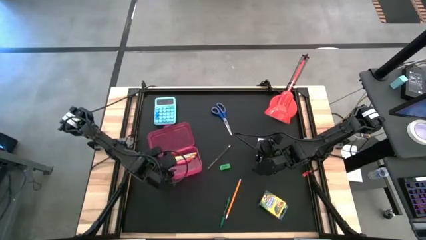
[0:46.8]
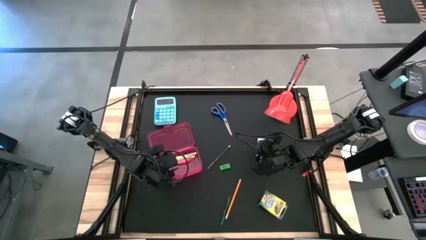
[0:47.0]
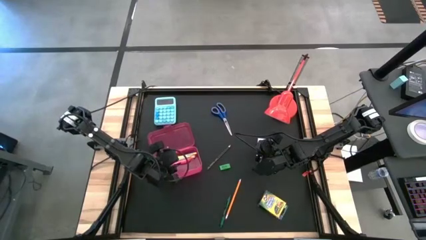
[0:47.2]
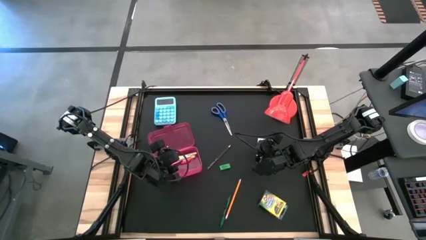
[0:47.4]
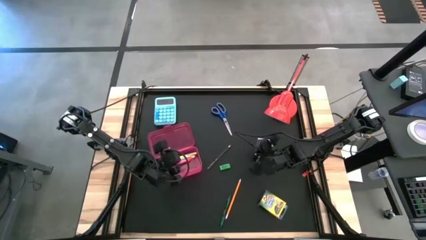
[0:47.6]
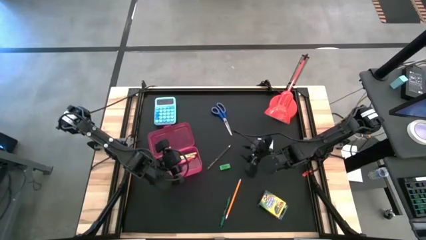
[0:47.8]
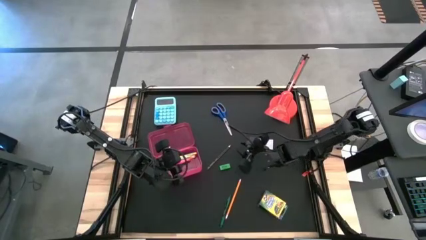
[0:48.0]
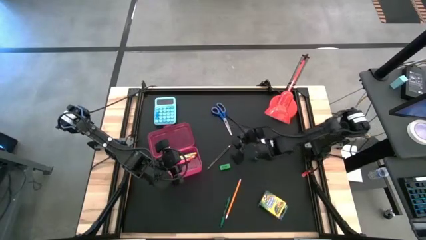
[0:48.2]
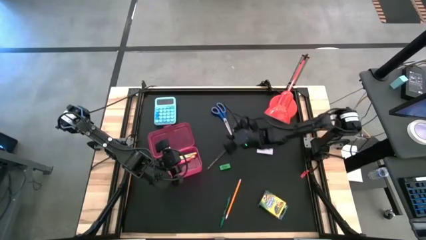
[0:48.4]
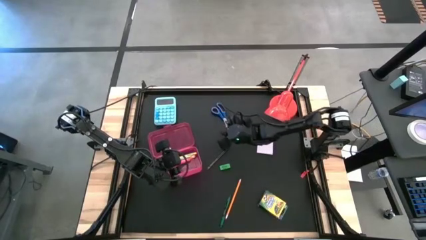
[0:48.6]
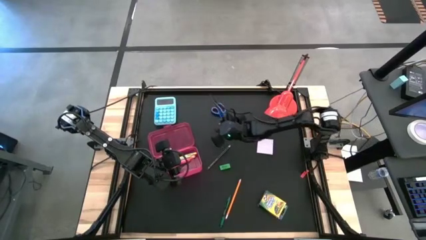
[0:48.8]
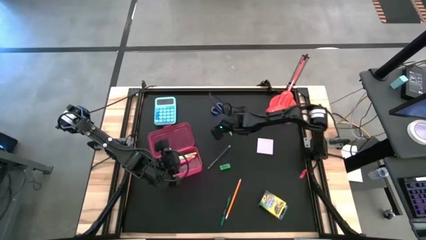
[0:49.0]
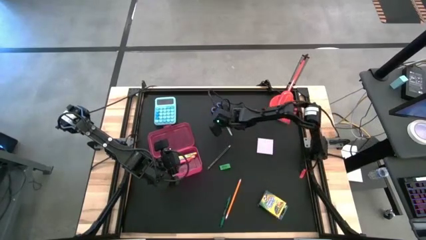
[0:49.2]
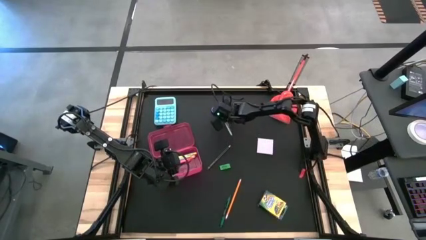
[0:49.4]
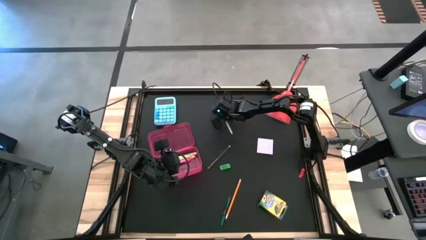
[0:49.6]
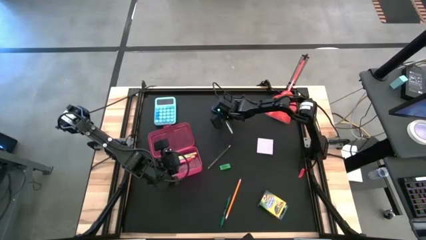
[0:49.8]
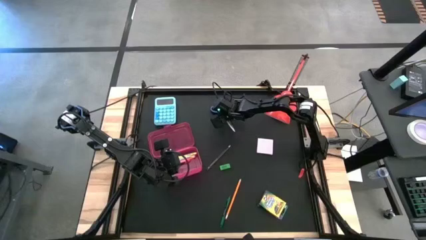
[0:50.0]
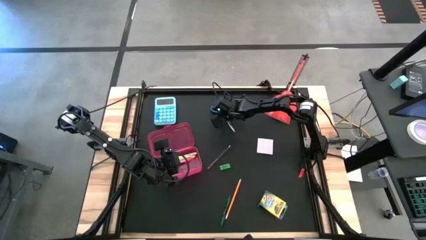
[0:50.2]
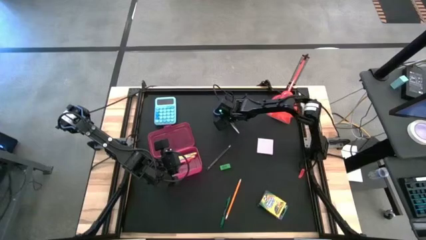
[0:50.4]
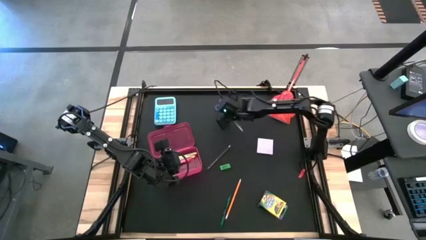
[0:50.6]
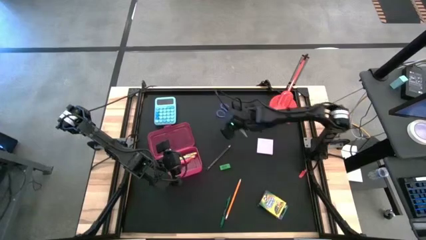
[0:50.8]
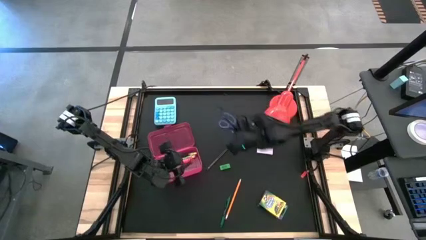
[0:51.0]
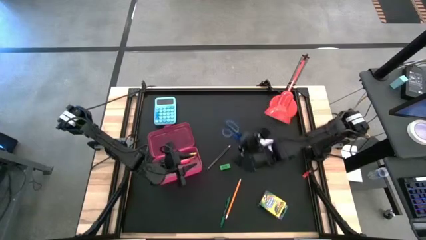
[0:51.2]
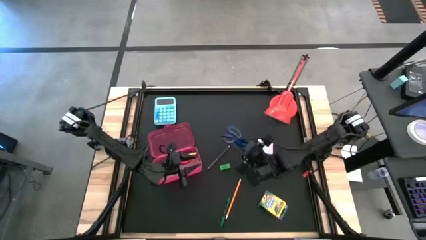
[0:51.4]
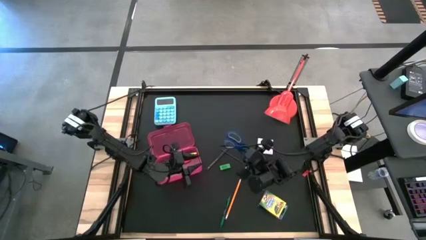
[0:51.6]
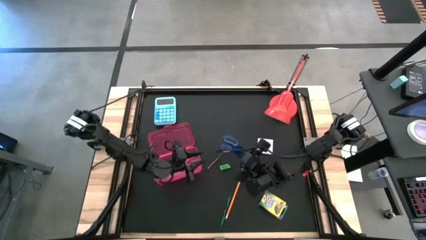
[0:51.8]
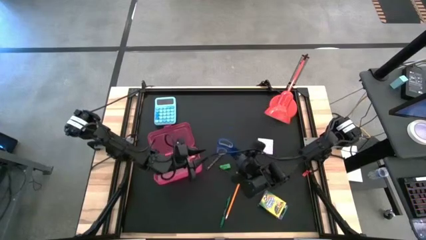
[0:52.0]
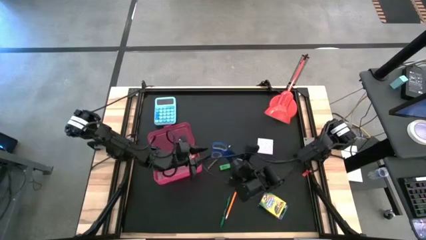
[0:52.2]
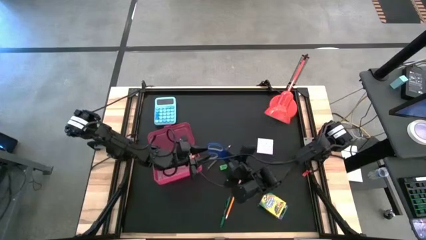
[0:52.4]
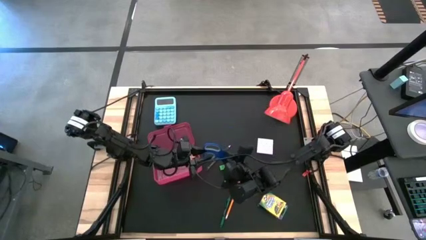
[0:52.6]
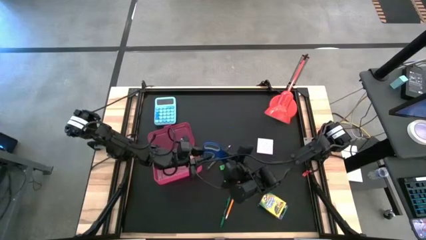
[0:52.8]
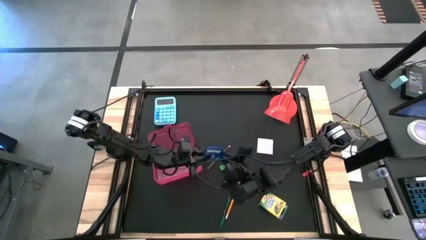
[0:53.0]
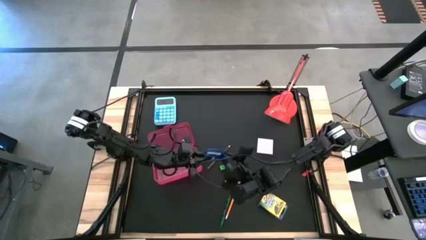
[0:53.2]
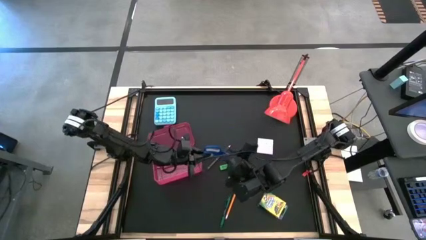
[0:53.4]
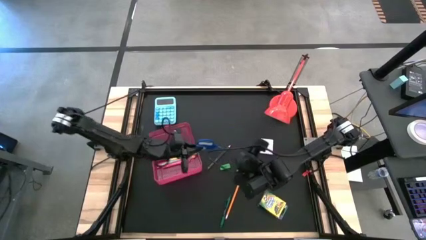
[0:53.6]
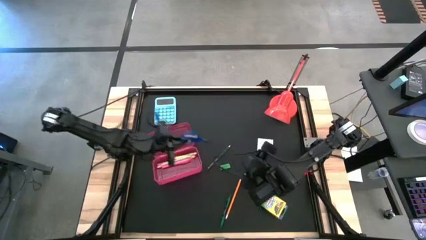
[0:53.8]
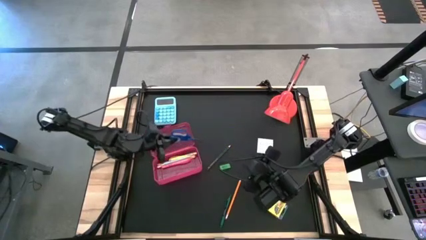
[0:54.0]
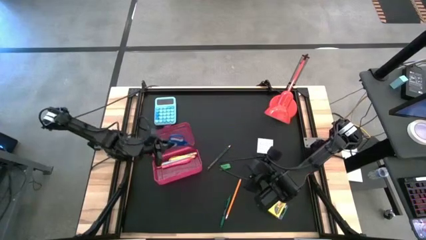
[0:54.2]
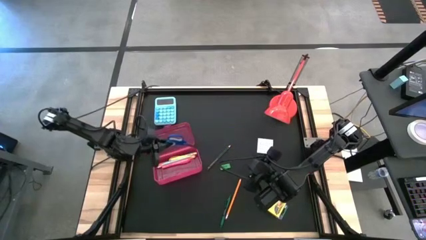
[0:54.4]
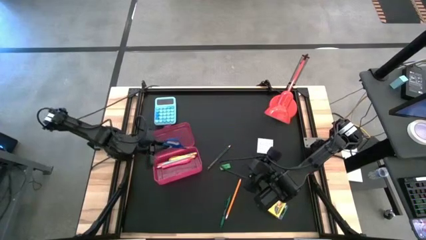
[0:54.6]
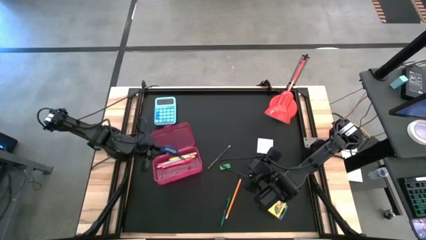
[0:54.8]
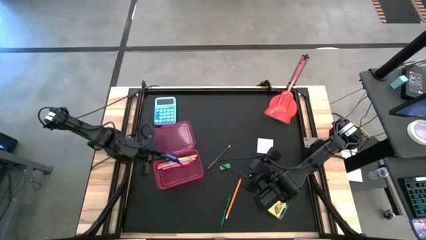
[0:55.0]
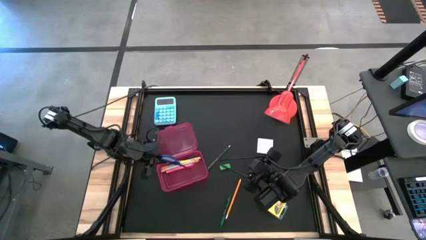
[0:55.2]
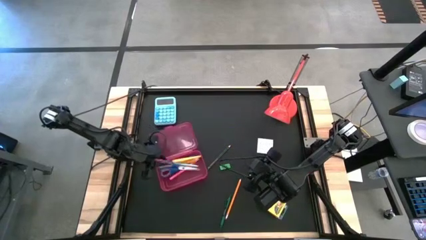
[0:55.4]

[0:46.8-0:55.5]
Task: Pack school essentials
Put the blue scissors into the pink supply box

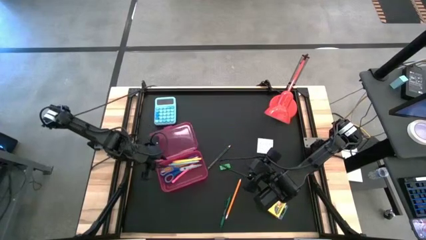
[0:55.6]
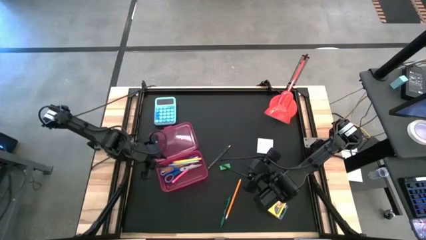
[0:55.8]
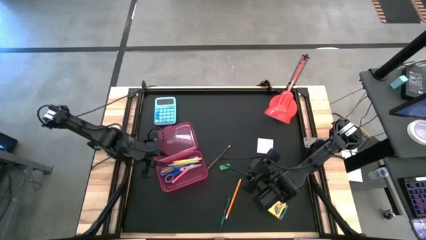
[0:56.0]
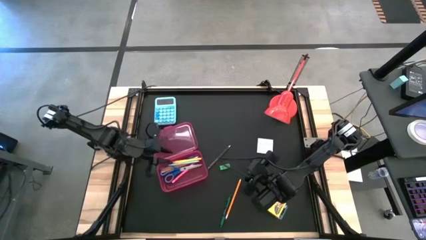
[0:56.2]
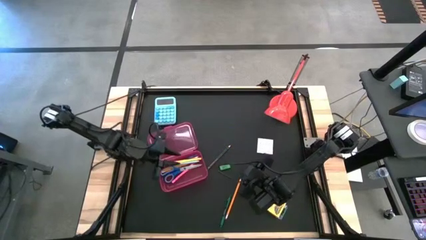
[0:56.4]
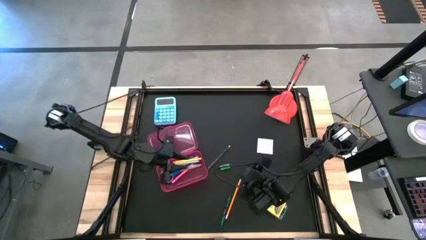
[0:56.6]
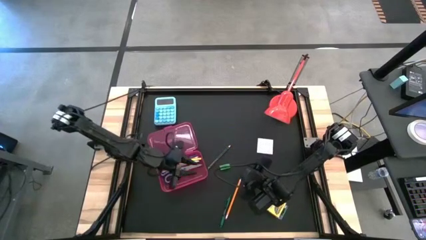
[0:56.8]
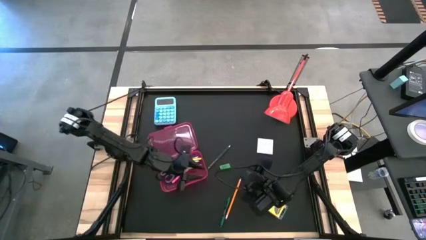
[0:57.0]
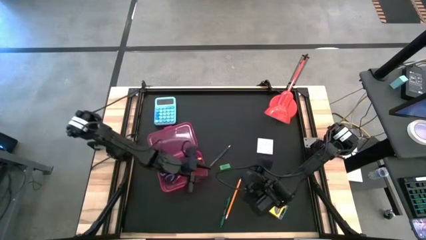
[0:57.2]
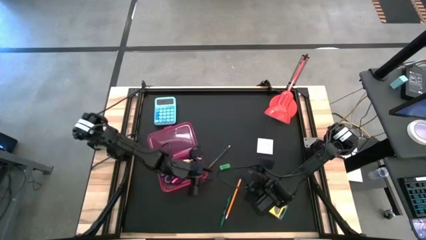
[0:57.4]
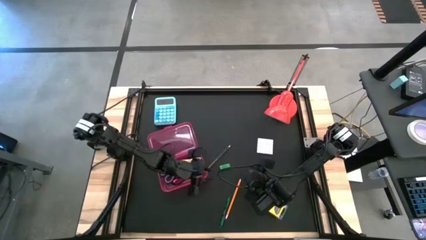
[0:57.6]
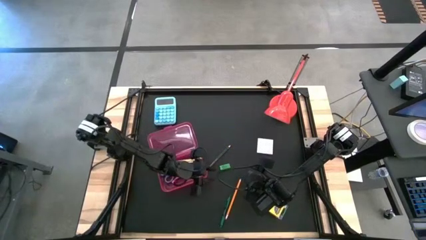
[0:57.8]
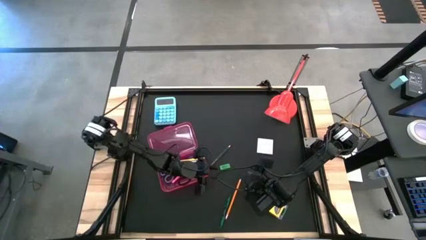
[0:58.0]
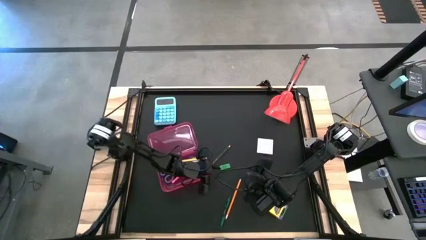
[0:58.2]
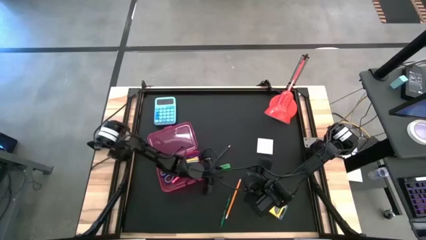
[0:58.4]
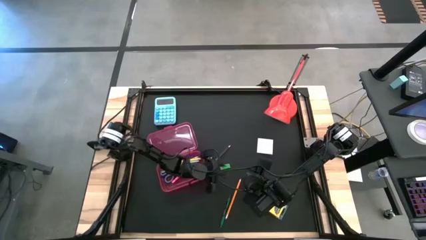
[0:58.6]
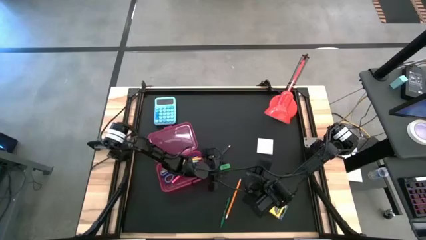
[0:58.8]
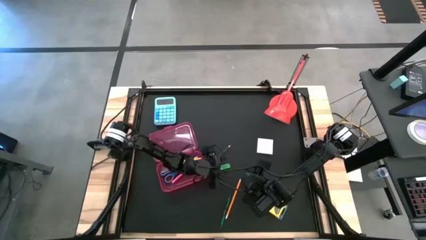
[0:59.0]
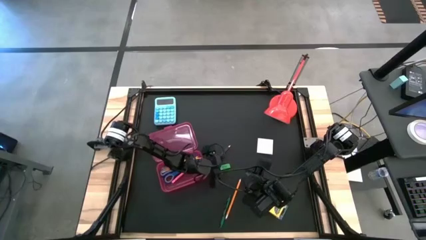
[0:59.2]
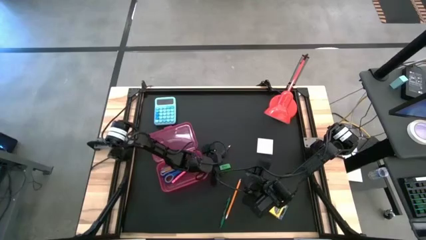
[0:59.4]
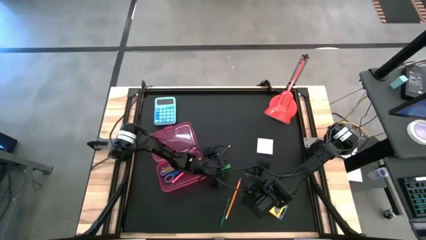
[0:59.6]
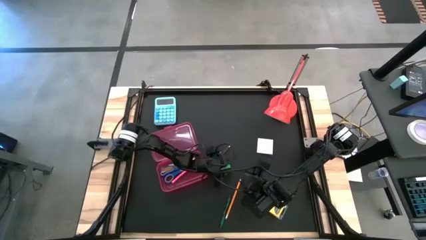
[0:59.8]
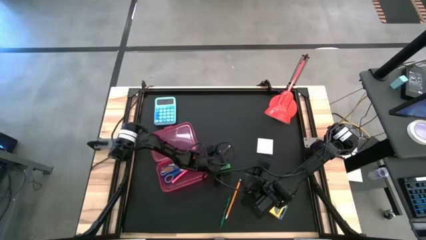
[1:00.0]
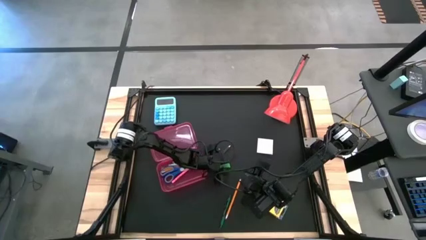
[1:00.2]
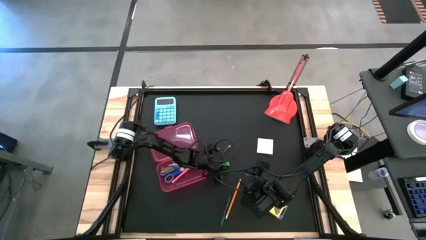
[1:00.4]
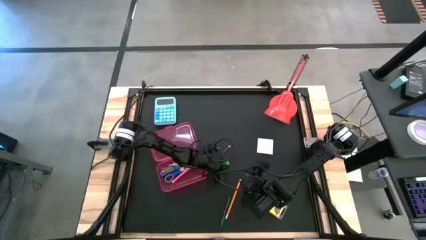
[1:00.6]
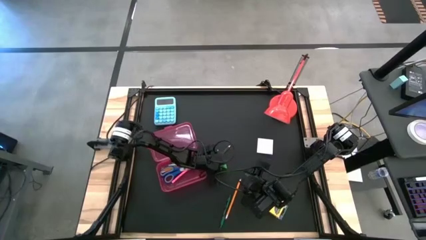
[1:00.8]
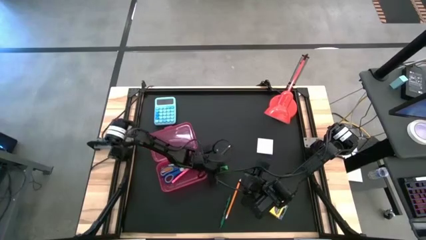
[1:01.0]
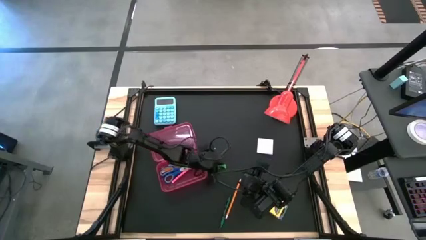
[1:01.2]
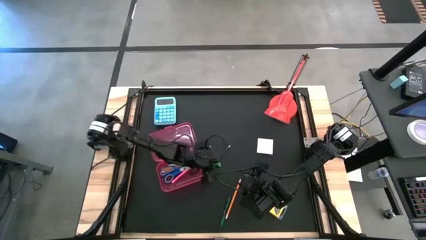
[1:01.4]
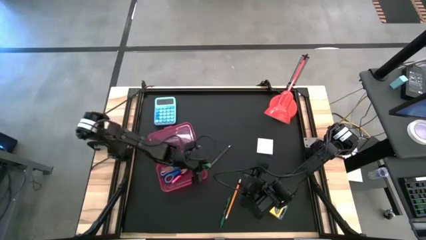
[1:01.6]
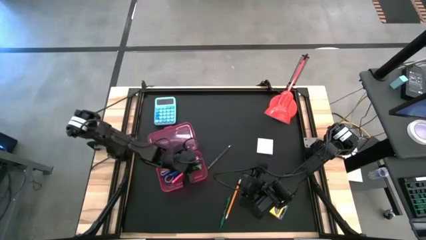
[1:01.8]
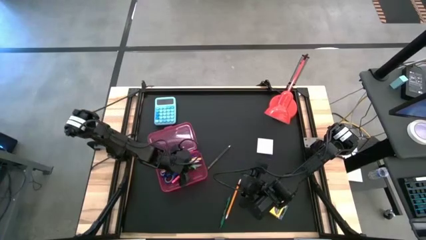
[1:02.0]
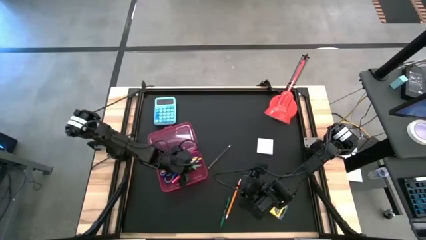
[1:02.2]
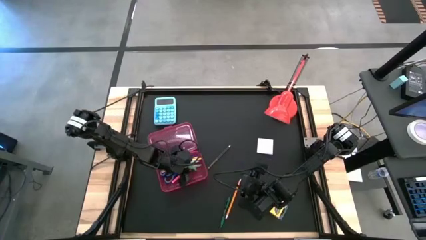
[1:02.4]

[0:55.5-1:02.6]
Put the green eraser into the pink supply box

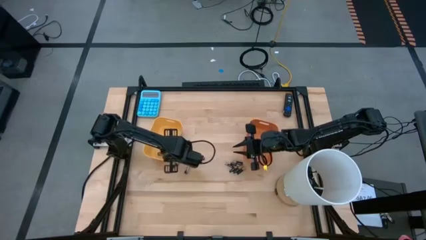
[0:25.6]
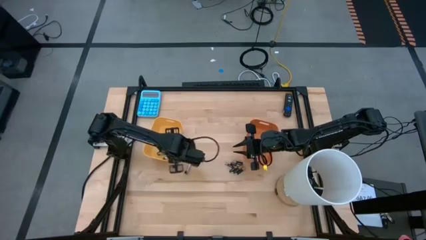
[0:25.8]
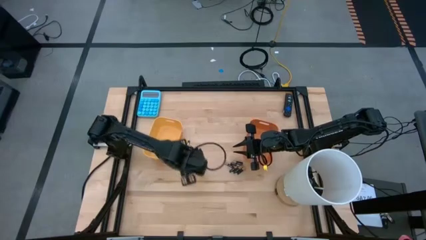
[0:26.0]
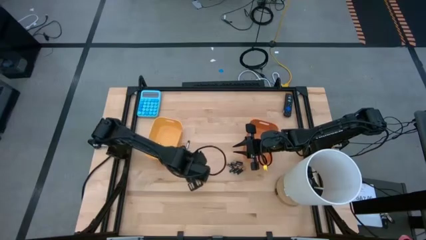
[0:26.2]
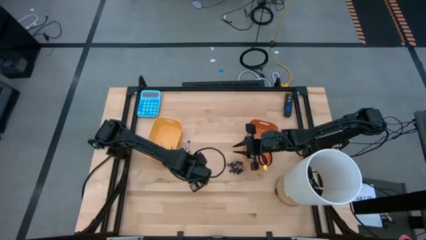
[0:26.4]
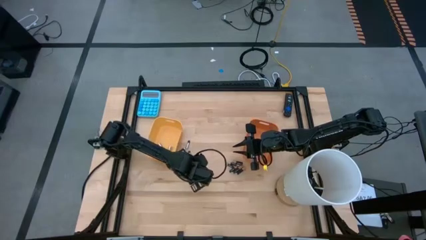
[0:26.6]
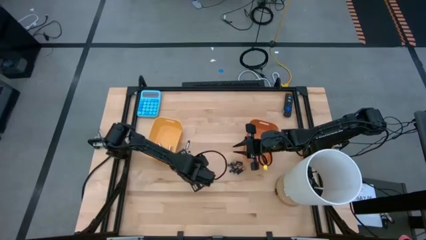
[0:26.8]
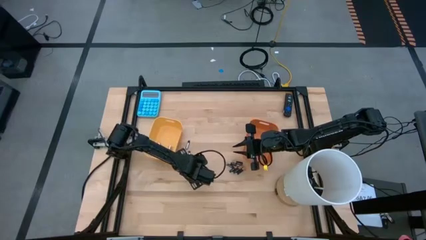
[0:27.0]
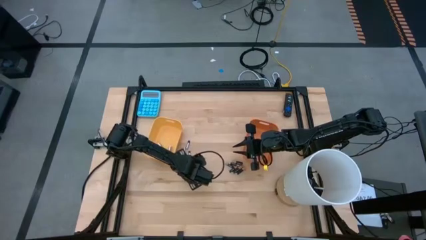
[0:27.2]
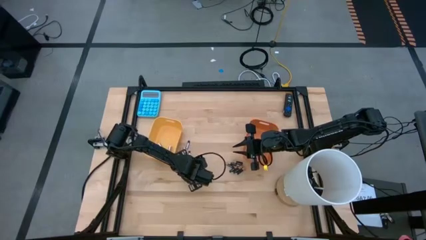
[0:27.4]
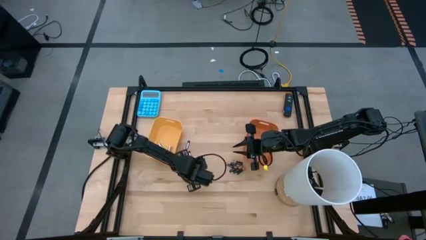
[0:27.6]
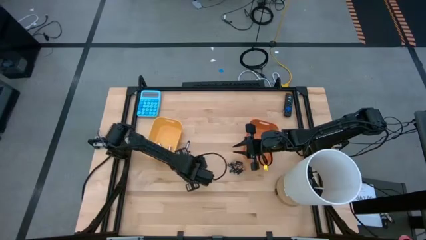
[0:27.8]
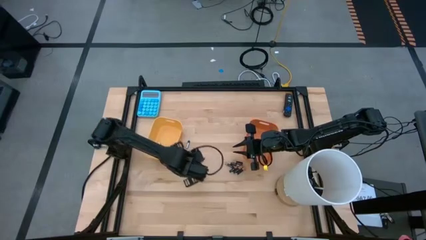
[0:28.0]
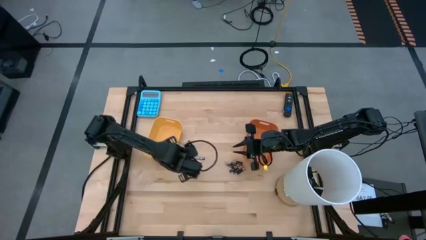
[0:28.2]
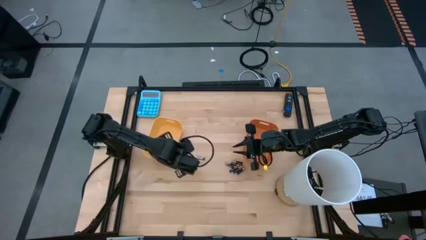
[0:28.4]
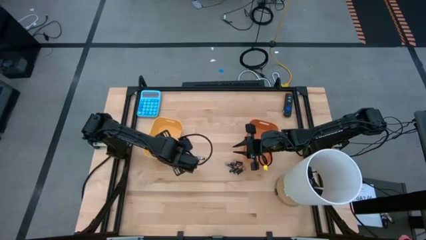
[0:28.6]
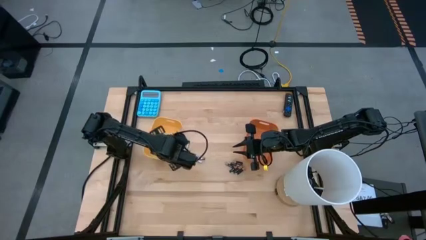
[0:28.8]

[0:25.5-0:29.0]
Task: Sort batteries
Put the silver battery into the yellow bin
